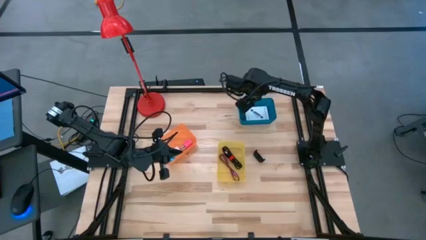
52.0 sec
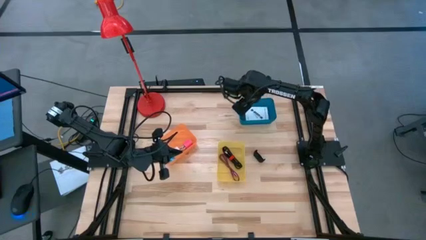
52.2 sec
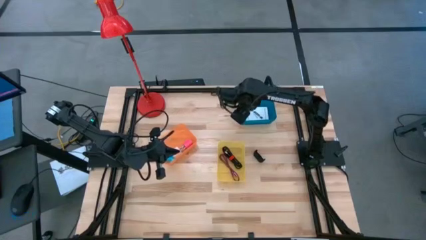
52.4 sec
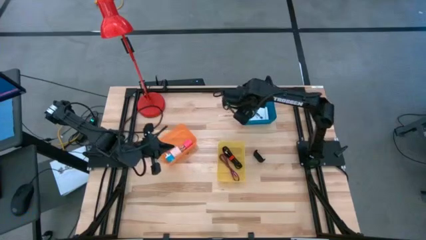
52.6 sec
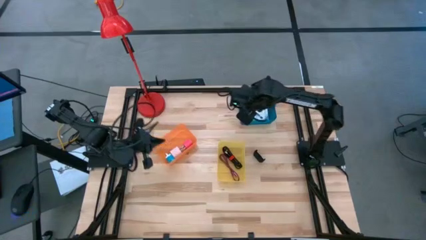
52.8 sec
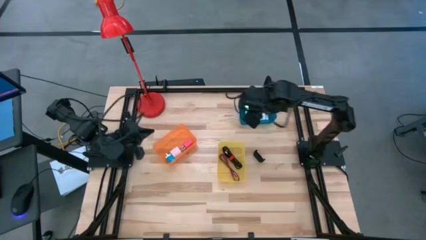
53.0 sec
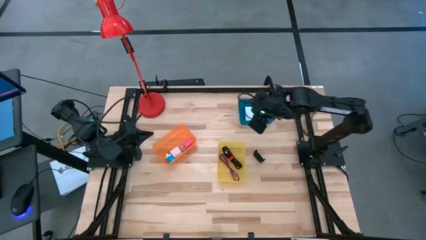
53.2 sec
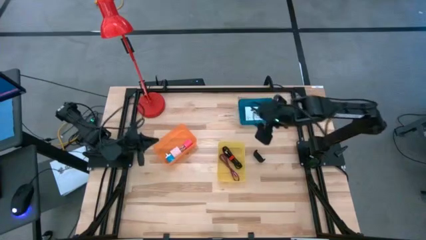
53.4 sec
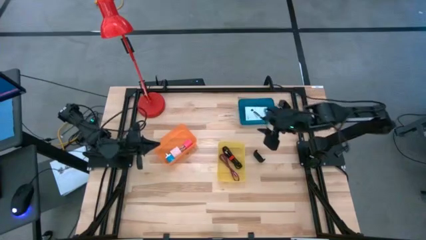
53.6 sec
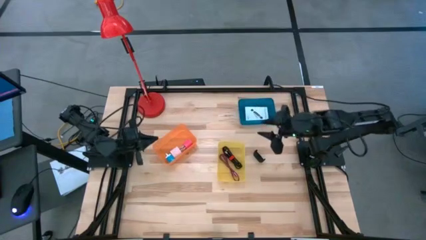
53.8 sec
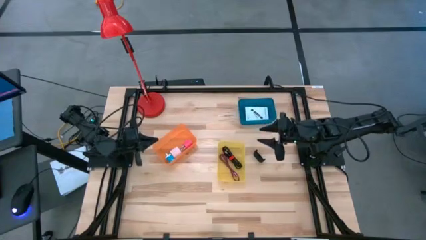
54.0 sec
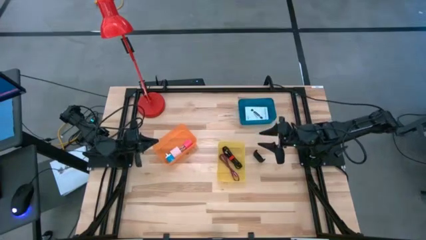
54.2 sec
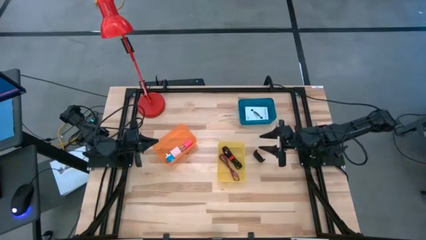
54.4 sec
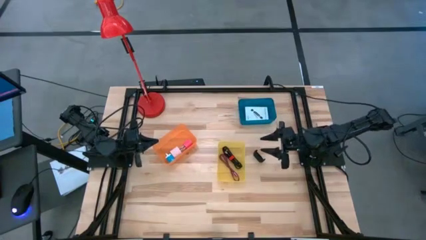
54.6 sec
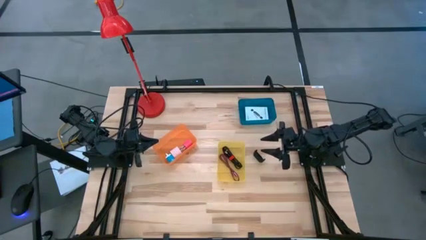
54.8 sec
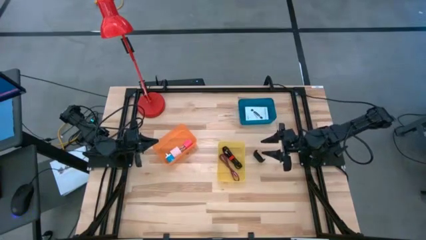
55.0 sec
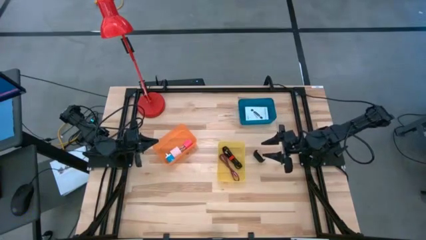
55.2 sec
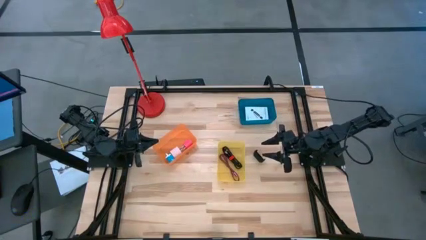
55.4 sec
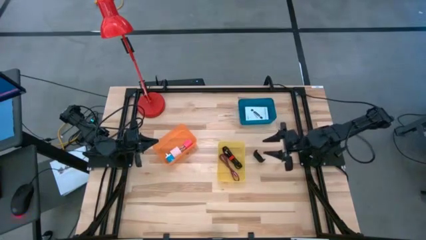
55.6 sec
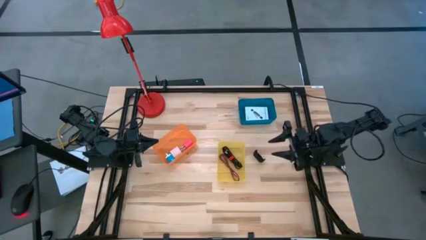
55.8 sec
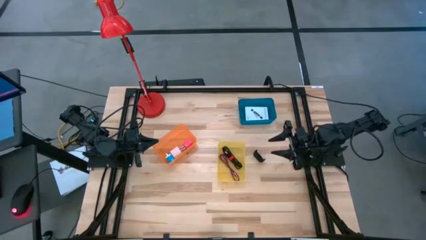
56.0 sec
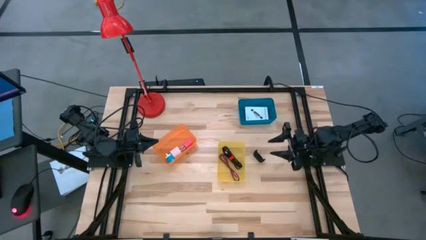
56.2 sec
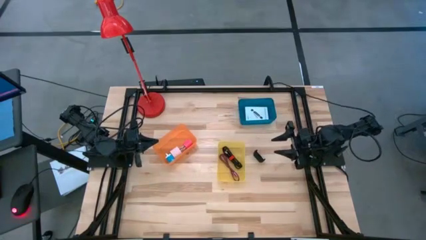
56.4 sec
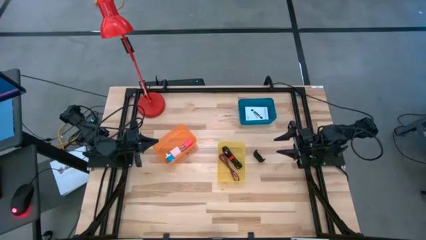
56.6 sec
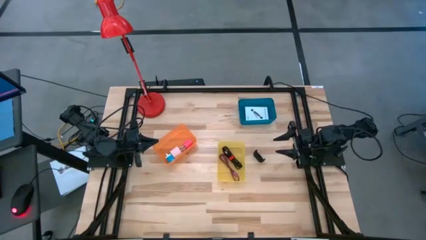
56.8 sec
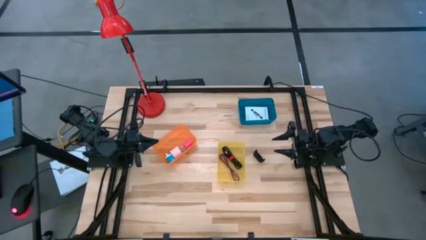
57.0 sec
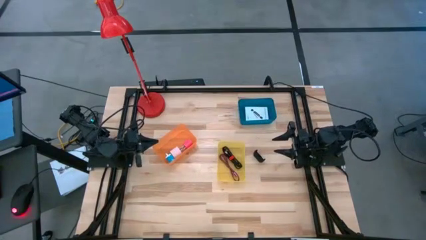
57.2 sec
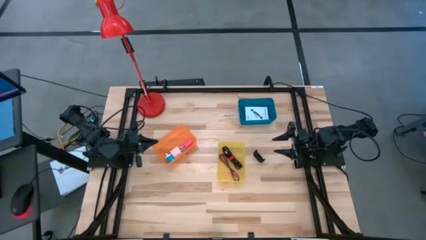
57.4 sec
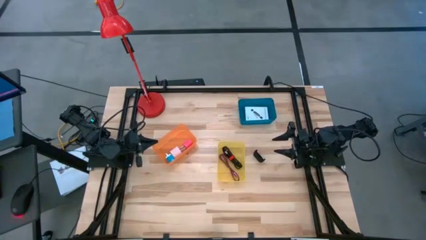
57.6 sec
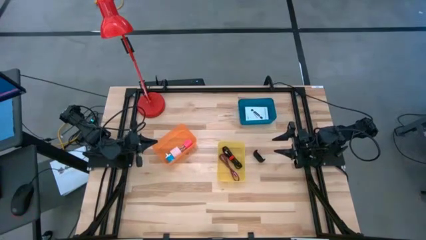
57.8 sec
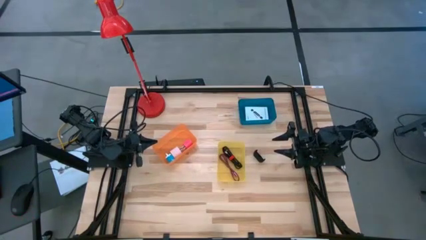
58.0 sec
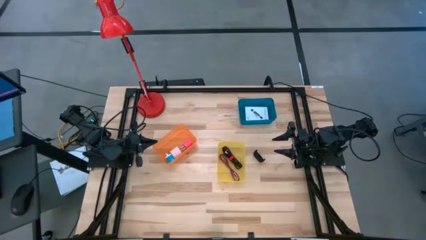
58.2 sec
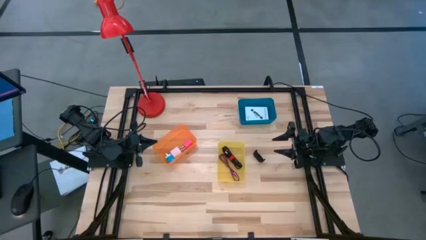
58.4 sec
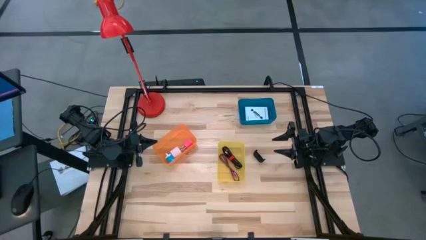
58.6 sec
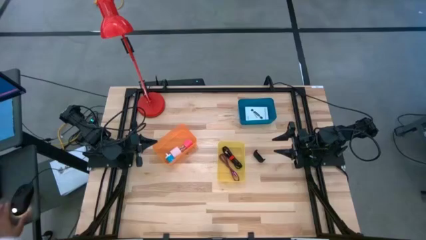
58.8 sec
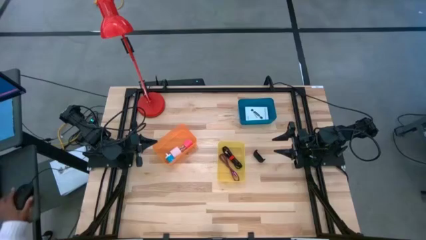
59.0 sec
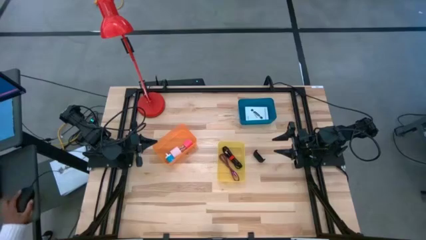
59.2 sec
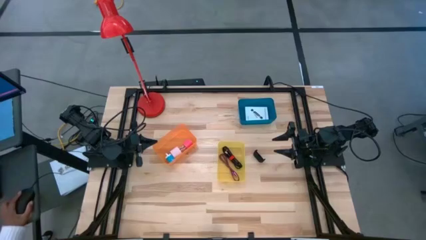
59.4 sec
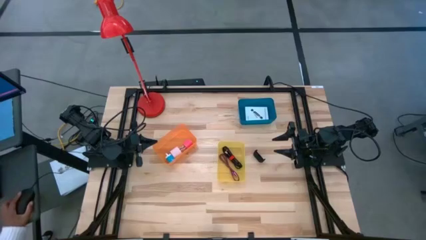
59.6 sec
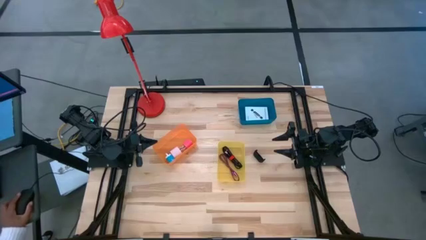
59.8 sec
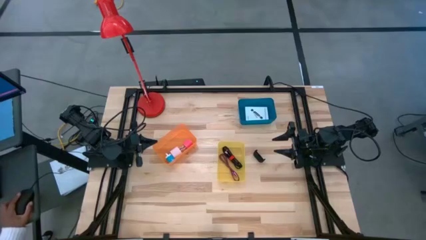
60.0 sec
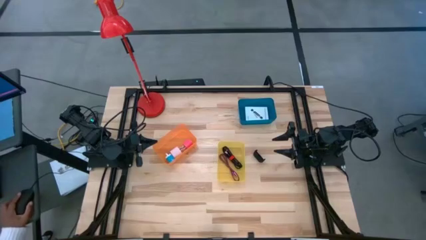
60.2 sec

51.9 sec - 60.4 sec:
Task: Pick and place items into bin
Return to Home Position
